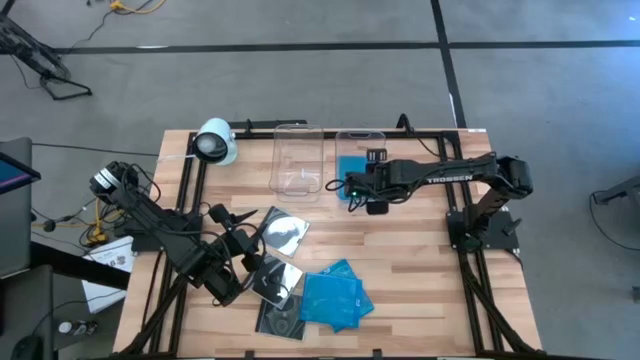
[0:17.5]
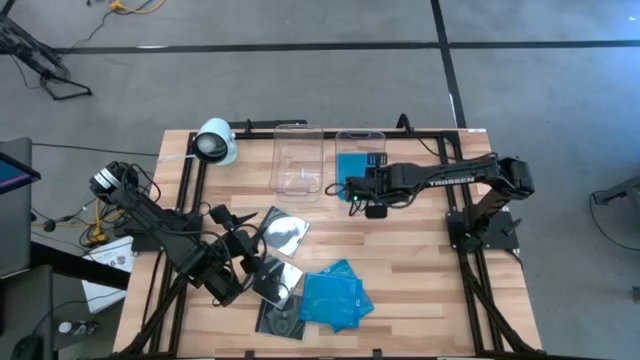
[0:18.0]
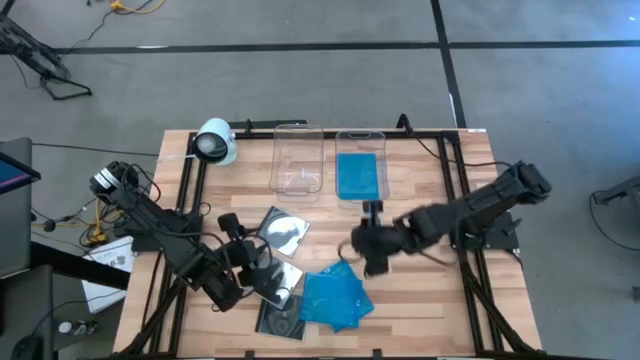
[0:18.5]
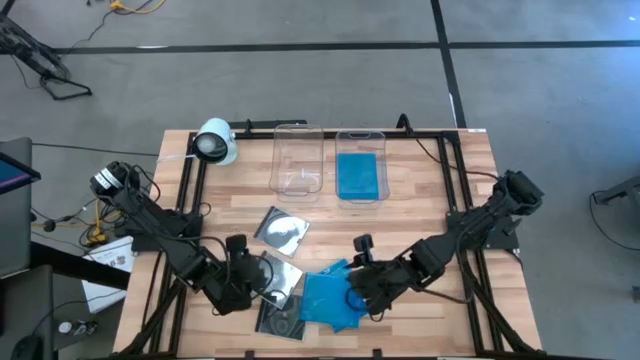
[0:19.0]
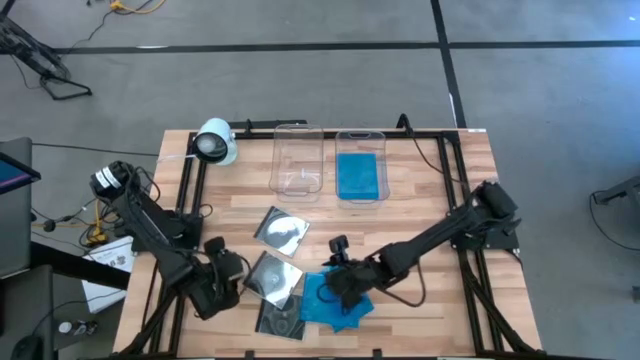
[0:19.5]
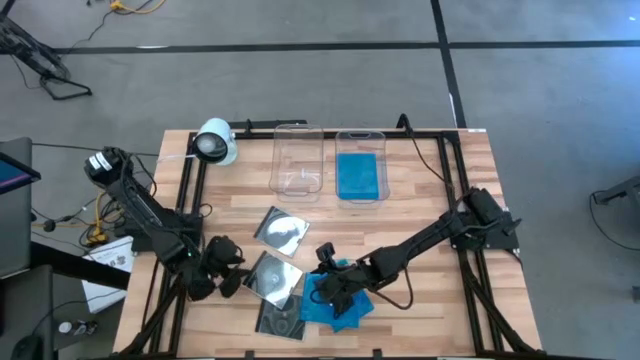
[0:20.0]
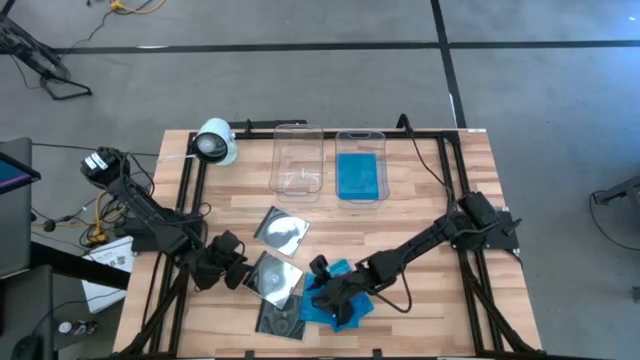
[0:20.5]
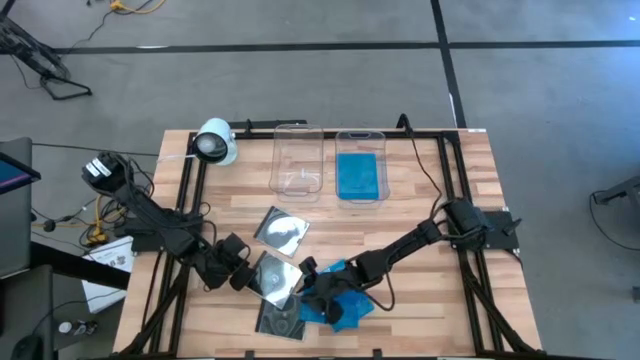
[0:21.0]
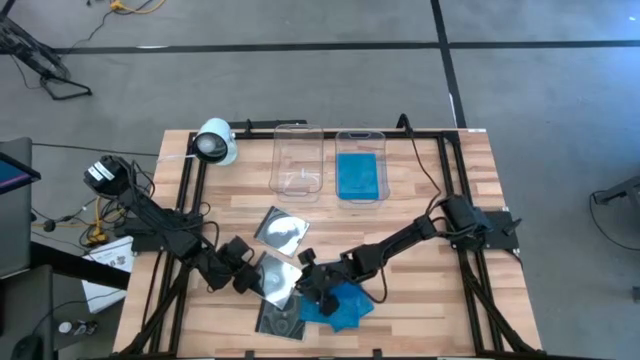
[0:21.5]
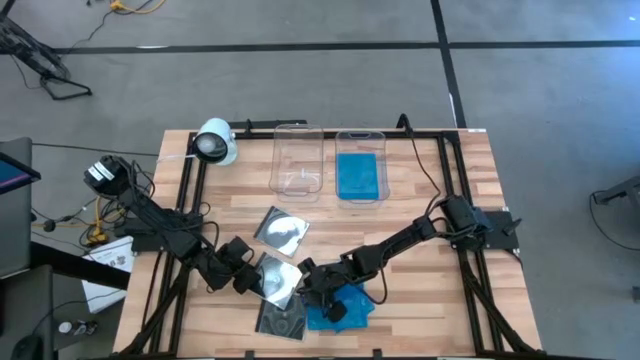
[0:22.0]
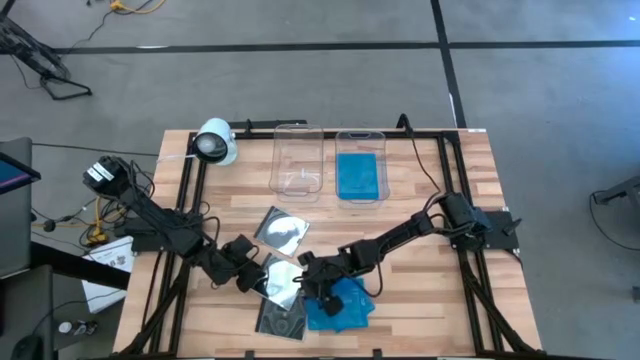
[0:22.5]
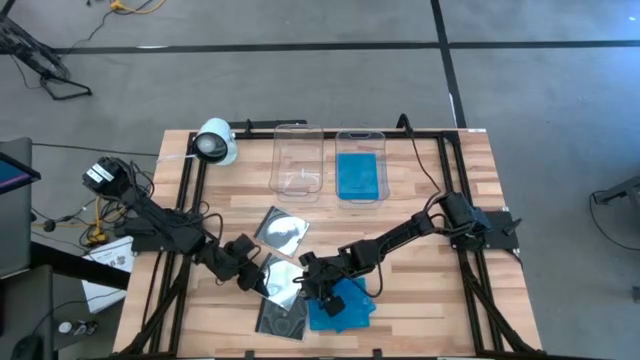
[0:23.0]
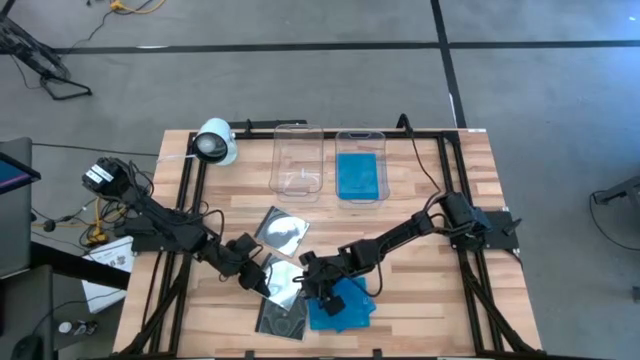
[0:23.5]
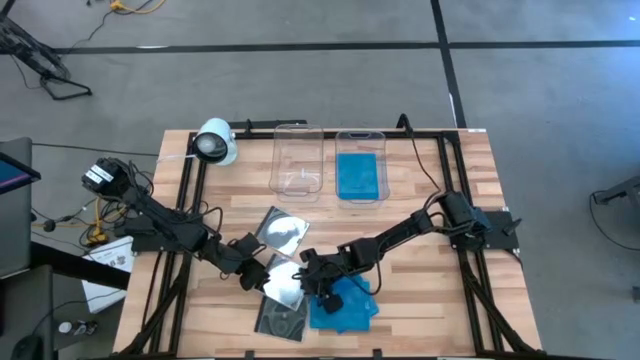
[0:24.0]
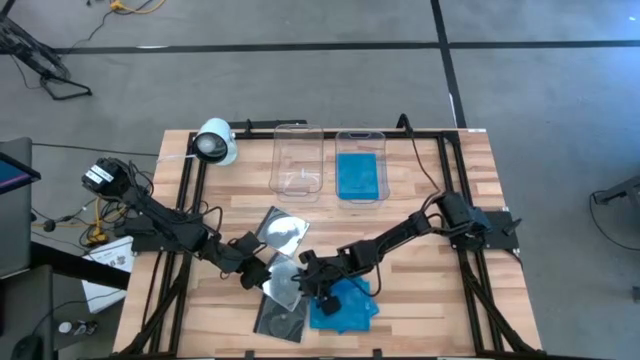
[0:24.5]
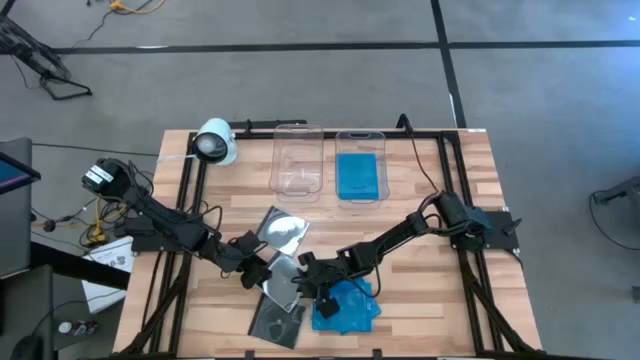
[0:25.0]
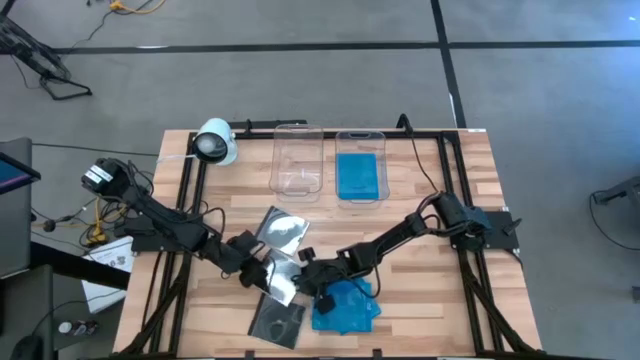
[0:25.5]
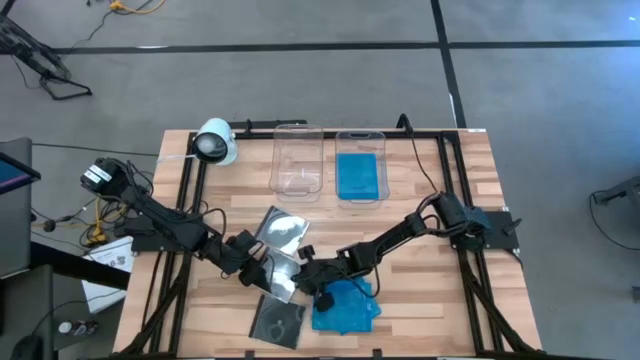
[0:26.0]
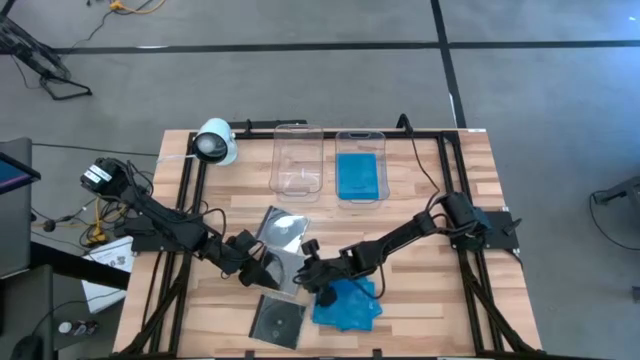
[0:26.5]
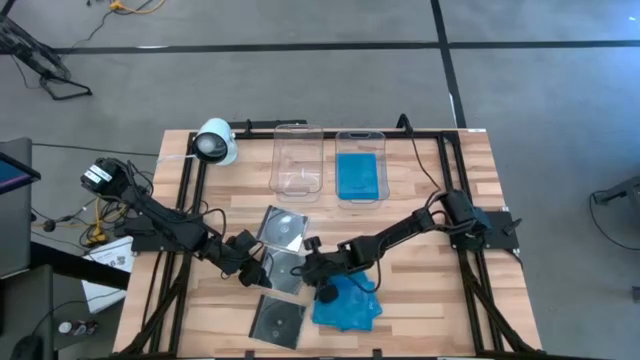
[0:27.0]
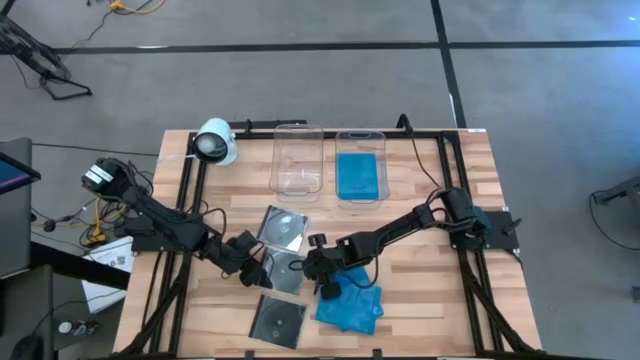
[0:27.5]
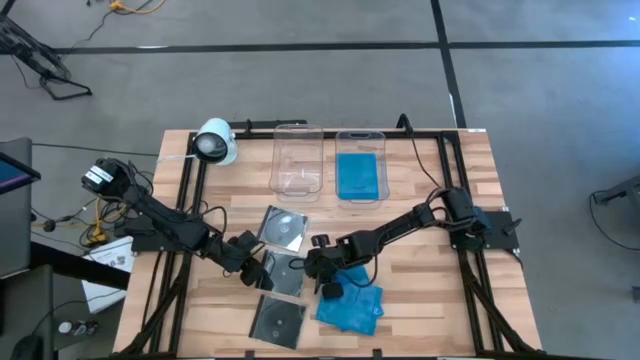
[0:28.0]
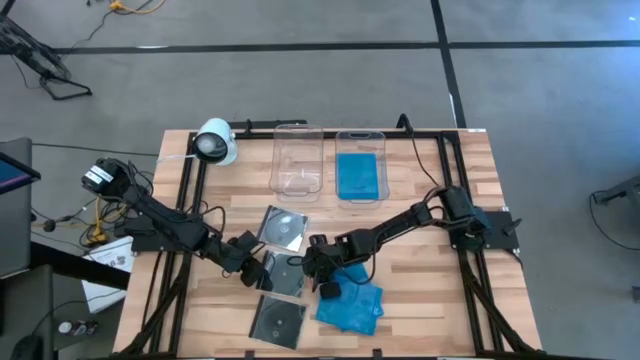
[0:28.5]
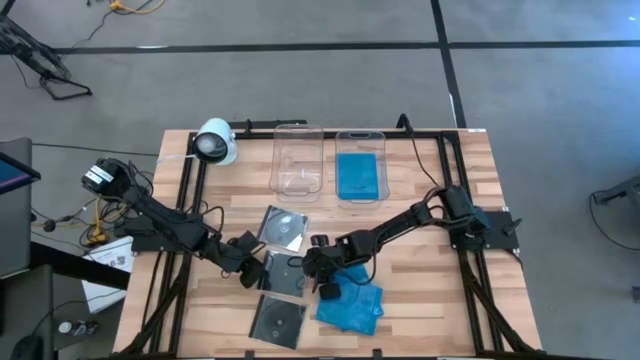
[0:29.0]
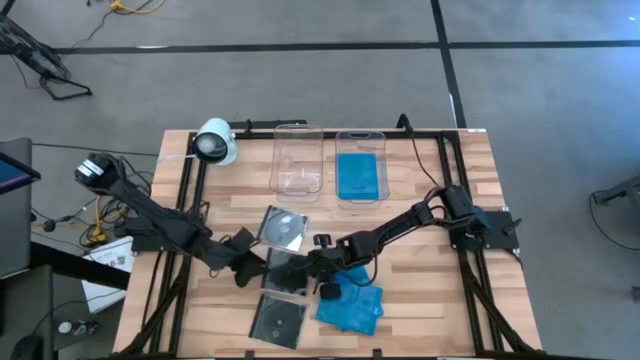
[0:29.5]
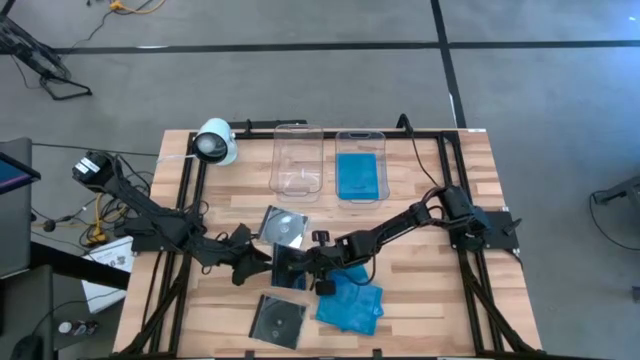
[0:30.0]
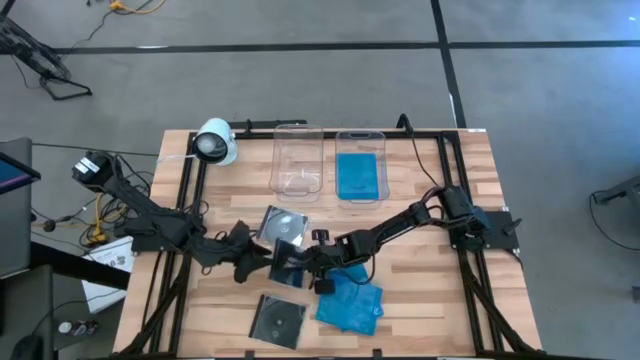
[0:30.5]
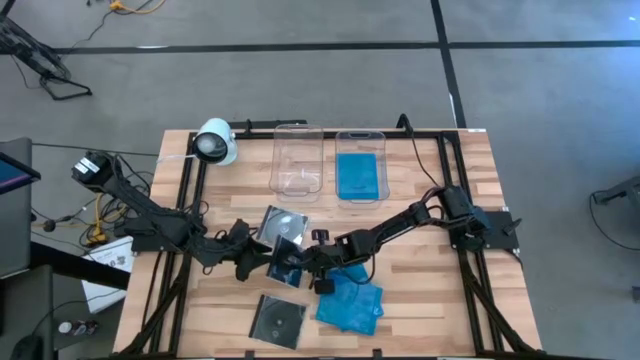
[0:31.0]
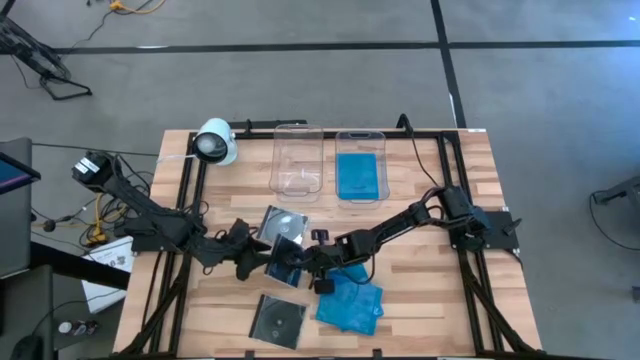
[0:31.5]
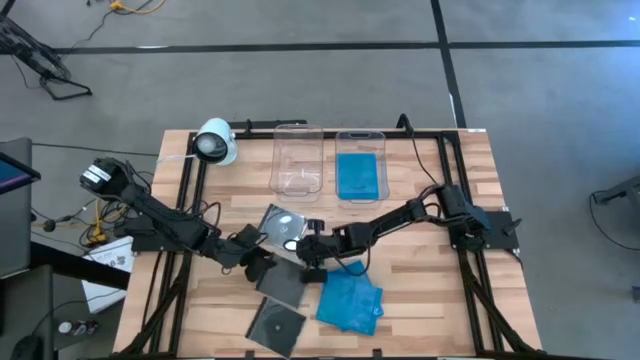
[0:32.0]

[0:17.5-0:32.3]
Task: Pick & place jewel cases by type
Put the middle black CD case into the left transparent bin

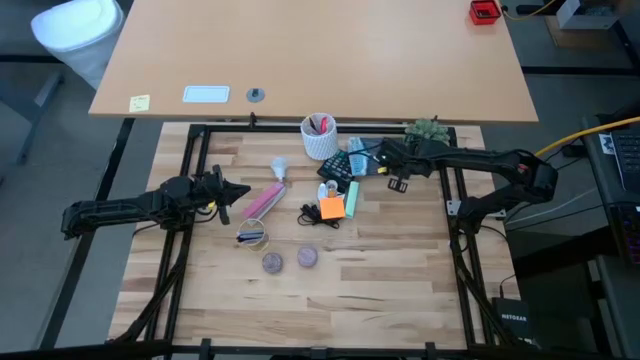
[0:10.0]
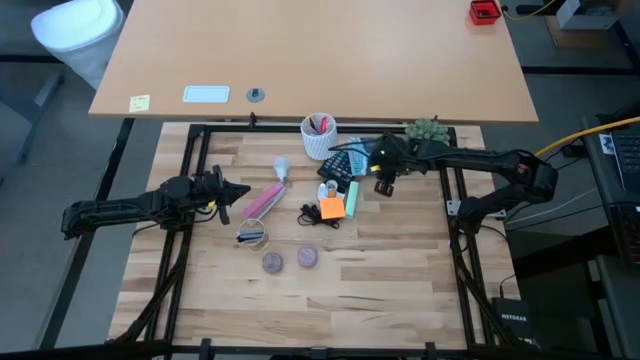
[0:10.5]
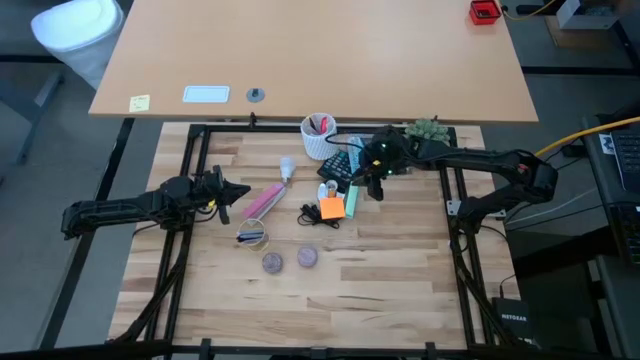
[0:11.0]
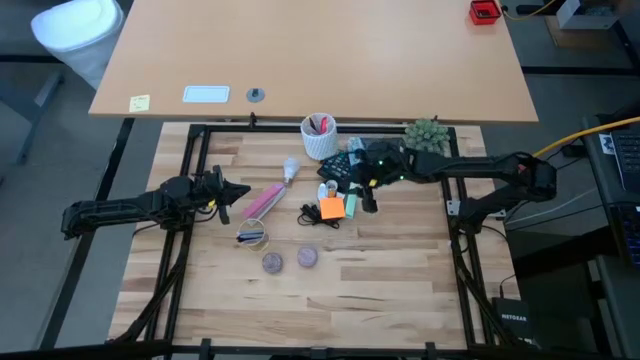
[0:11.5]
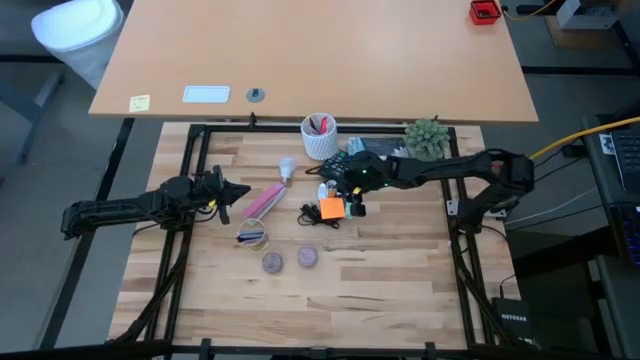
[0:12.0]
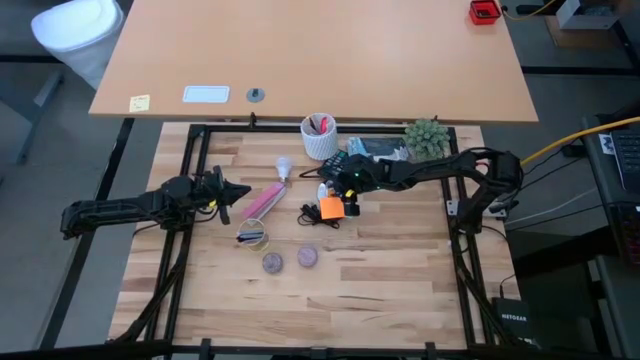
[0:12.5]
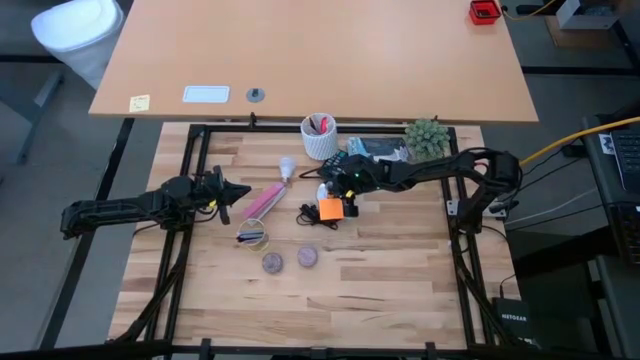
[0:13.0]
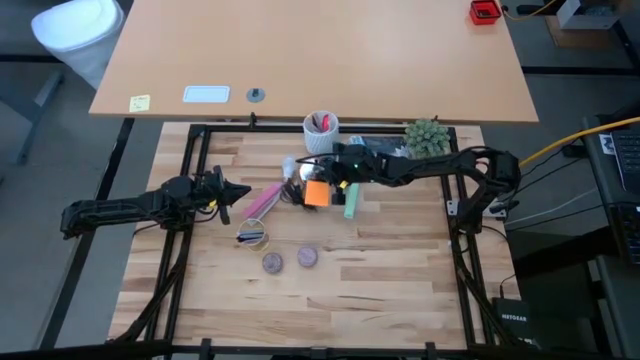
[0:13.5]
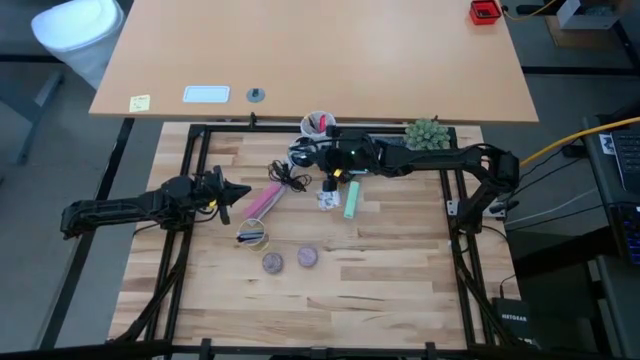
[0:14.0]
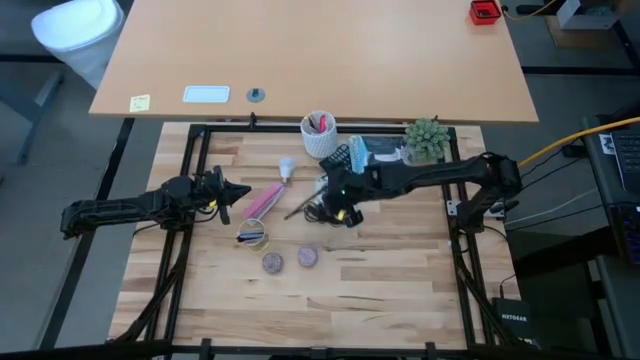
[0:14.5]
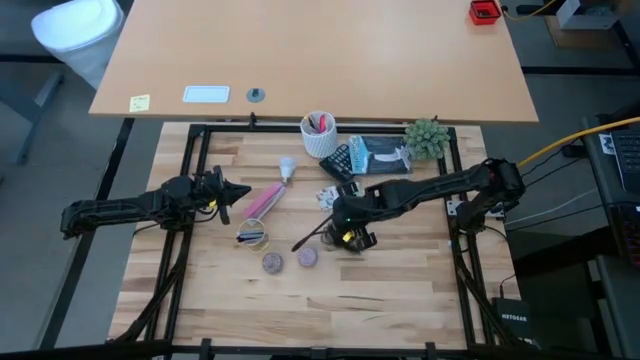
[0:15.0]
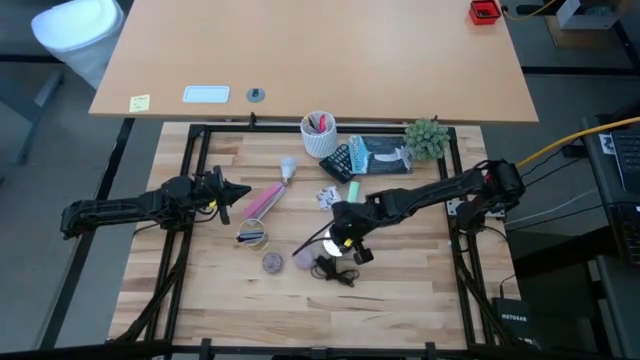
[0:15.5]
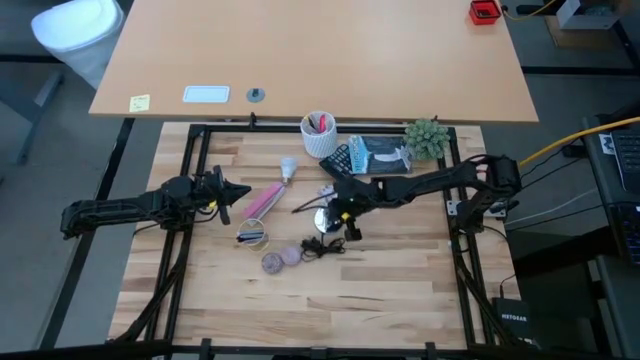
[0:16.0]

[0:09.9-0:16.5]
Task: Screw lightbulb
Prepare the silver lamp
